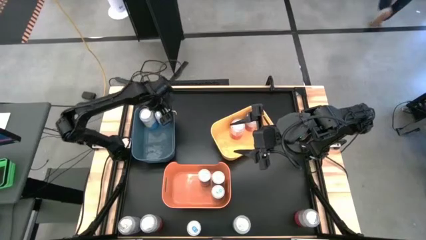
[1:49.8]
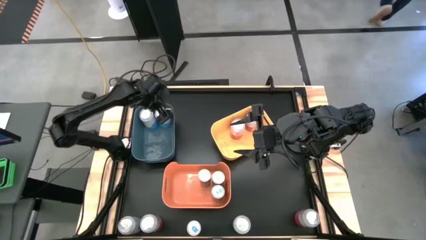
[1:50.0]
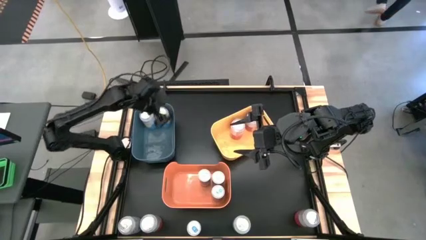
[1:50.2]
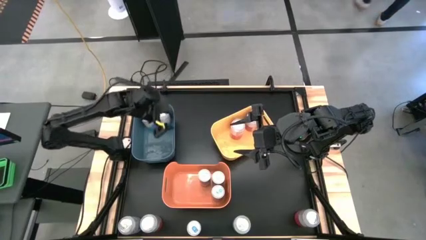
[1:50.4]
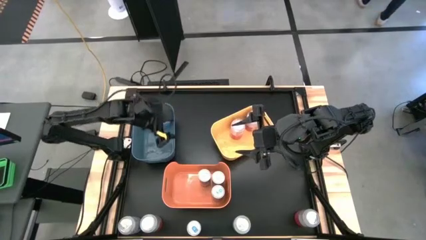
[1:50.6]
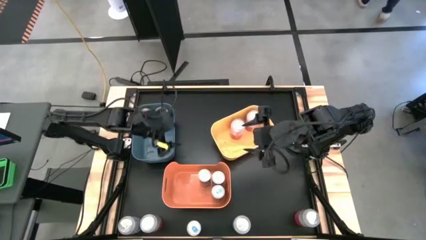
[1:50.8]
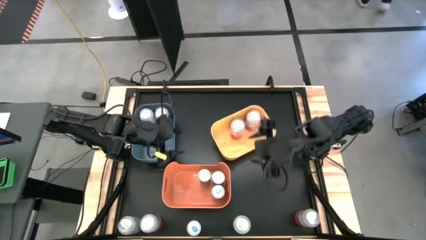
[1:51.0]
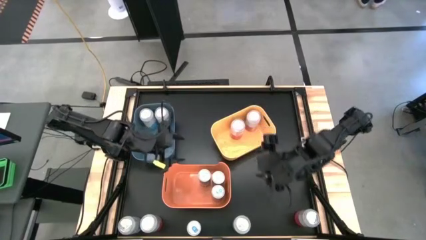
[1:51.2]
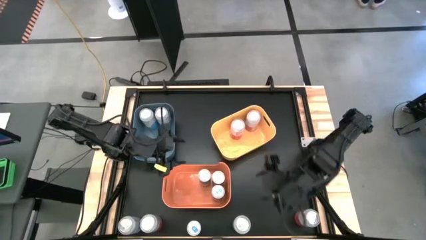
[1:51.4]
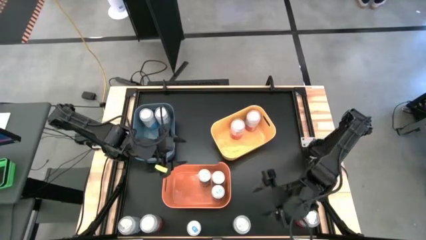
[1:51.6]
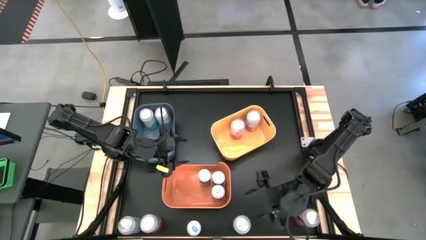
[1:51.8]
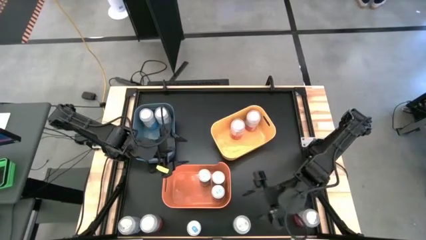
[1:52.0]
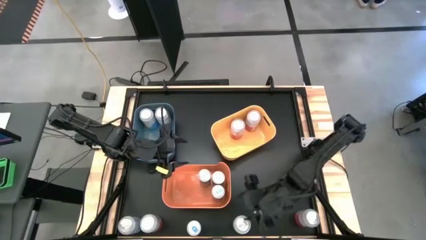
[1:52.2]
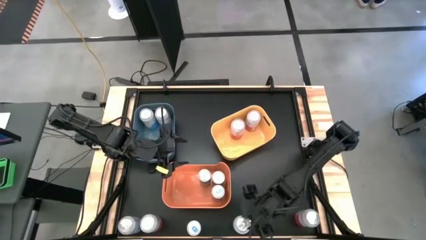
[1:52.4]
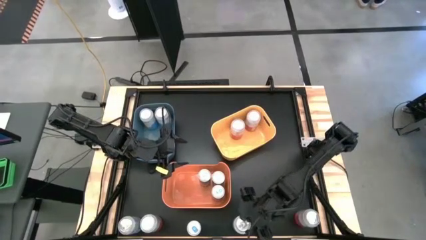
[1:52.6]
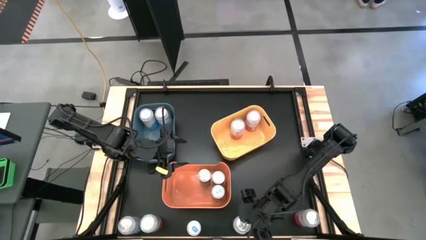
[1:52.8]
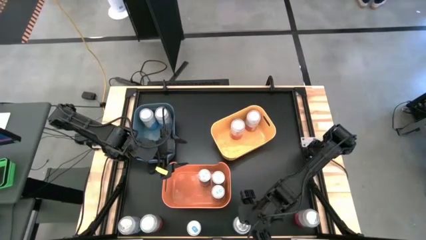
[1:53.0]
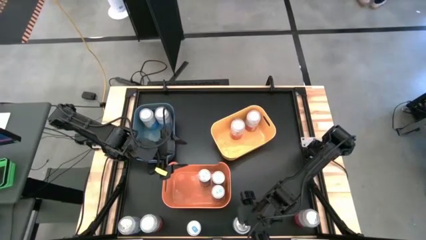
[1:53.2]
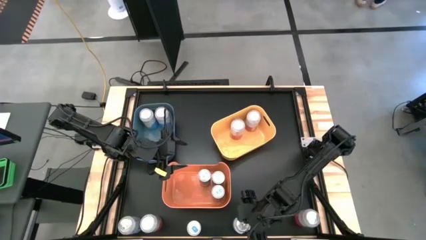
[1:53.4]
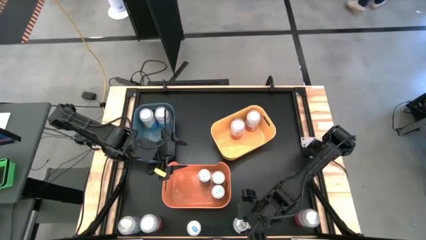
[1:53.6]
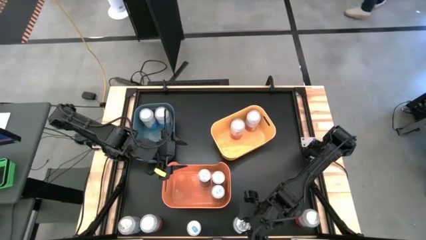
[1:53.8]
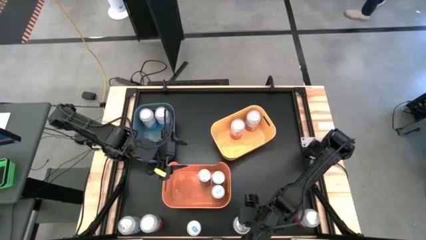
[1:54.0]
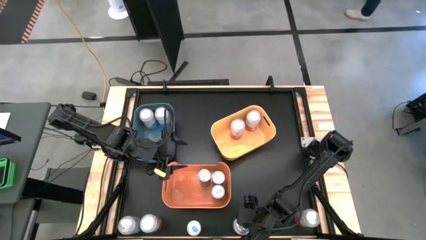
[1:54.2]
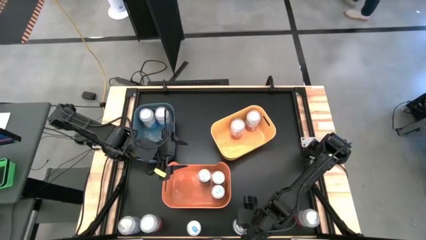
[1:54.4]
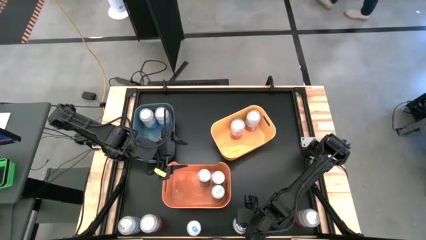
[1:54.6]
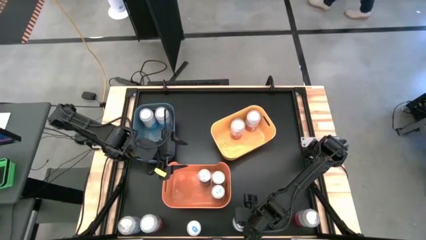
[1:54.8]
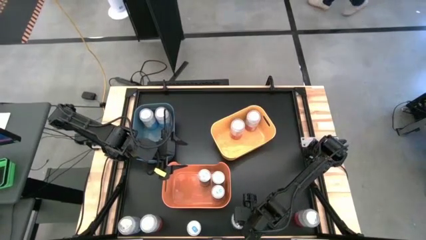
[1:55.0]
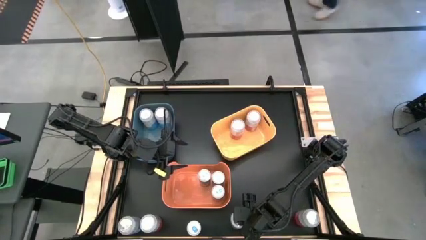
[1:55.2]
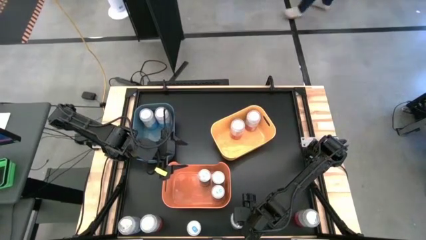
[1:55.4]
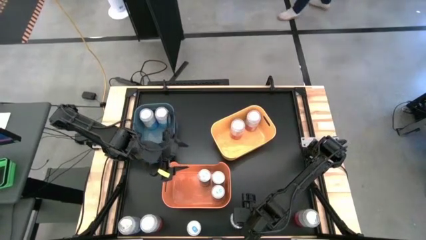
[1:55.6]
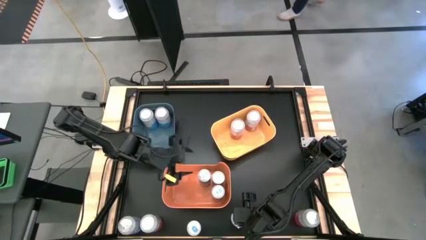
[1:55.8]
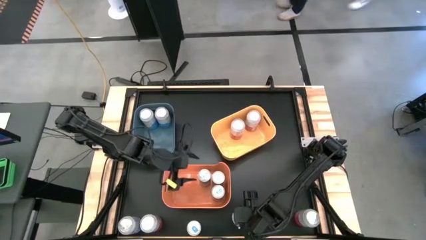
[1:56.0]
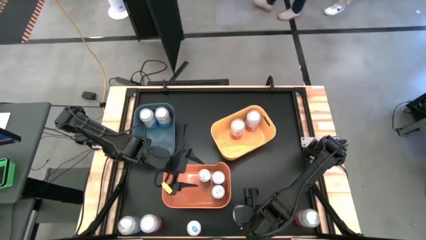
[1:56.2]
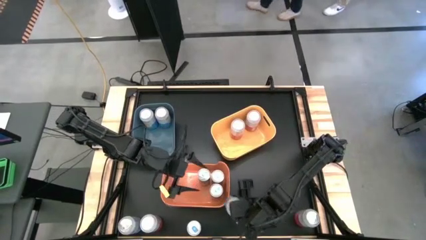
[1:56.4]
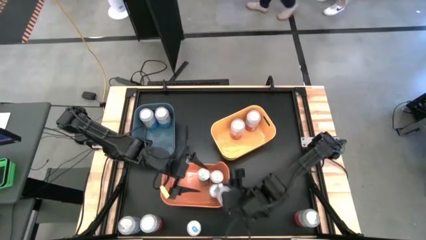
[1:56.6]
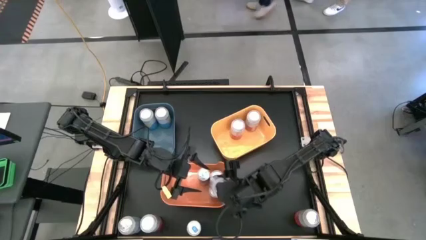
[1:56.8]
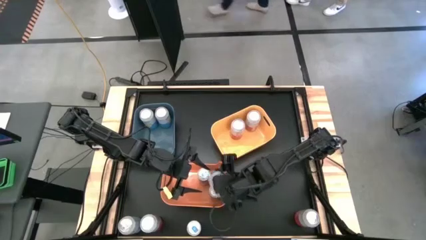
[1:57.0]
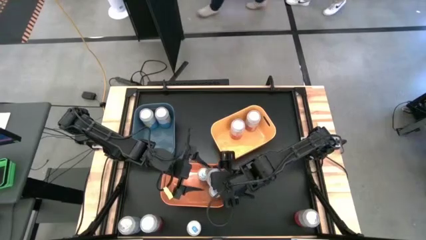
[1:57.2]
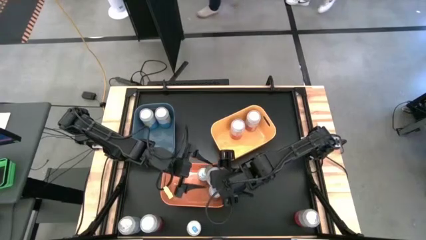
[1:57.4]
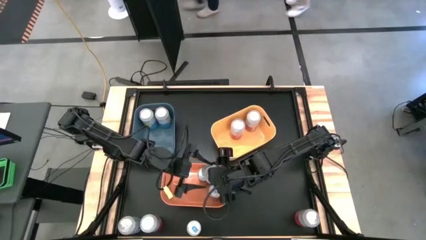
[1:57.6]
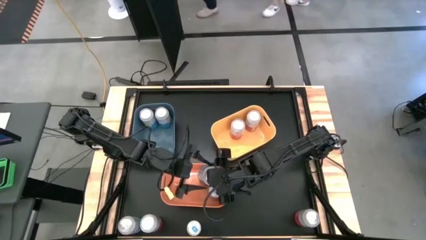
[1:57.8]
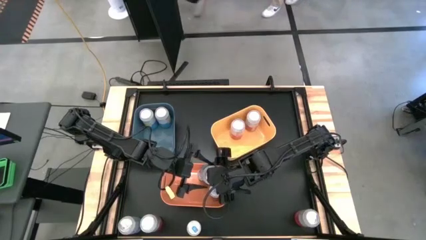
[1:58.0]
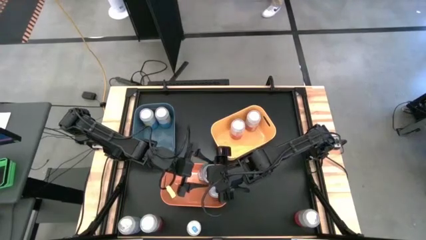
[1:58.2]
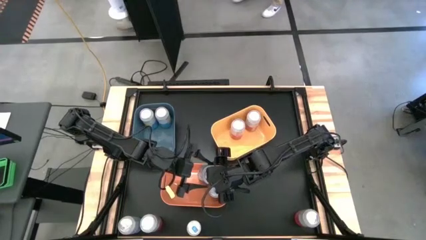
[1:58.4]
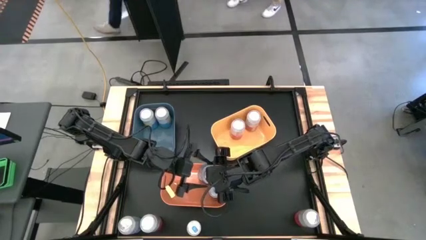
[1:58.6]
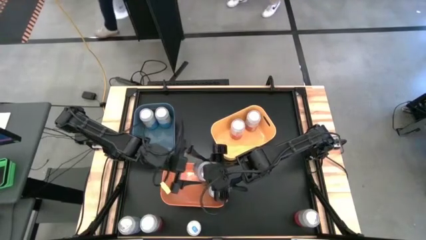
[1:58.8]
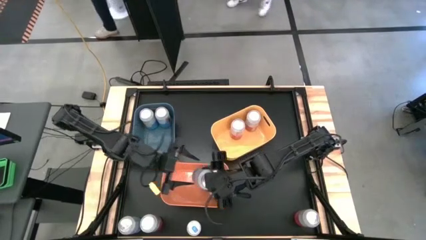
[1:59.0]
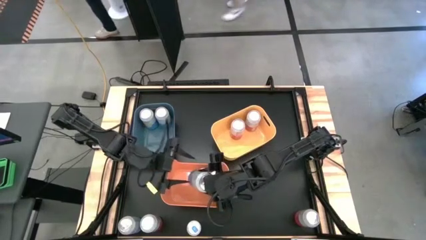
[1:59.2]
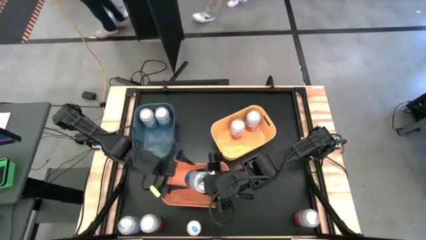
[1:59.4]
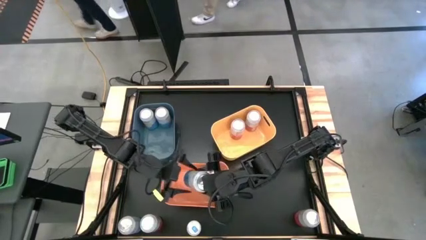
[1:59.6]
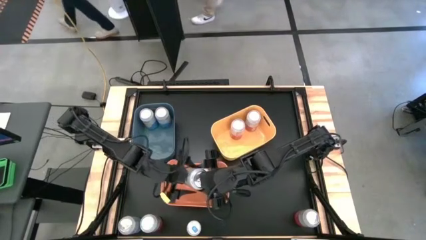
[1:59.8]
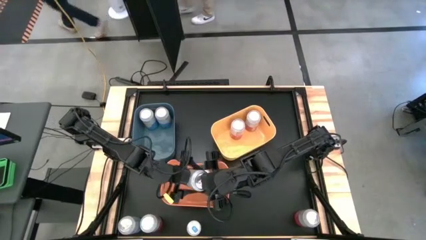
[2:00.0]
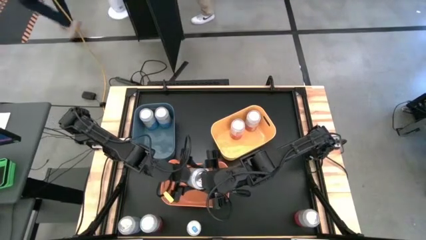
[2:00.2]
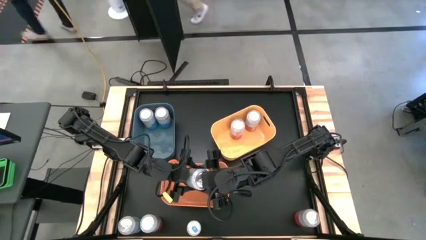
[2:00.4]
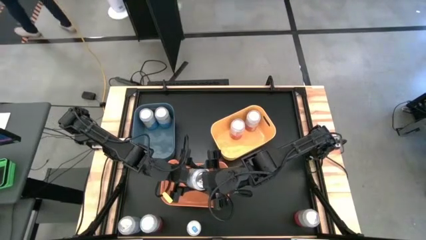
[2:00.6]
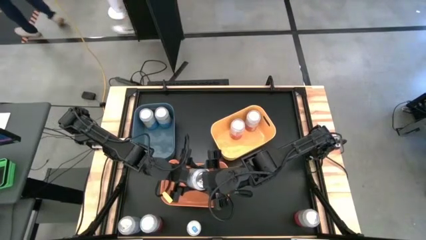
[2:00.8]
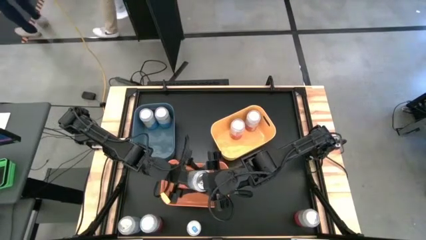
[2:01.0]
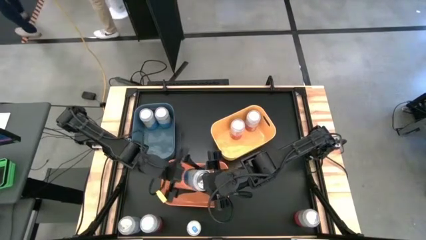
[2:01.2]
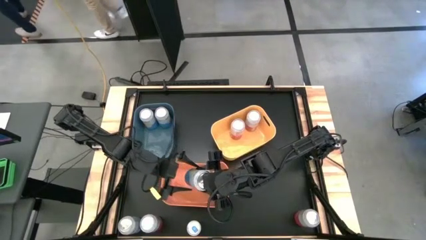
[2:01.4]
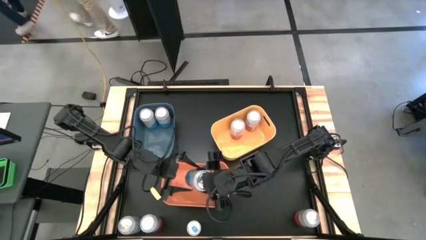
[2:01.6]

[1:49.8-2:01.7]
Task: Sort soda cans
Put the blue soda can into the blue bin

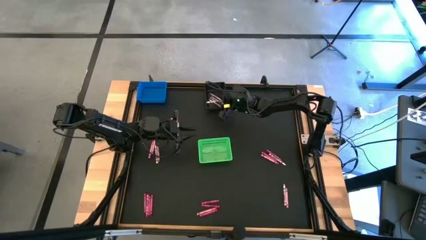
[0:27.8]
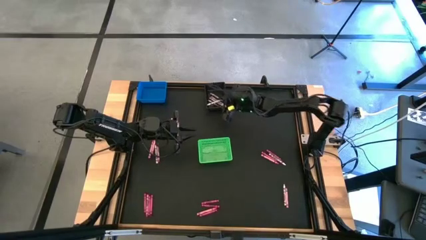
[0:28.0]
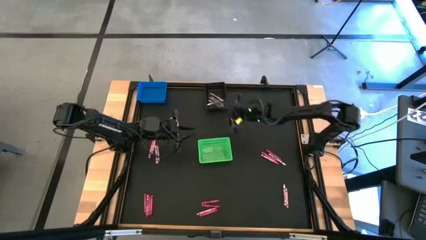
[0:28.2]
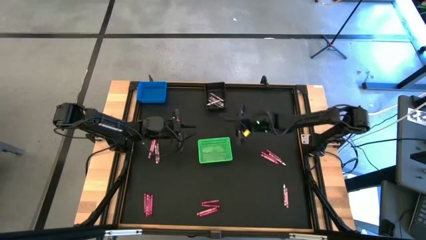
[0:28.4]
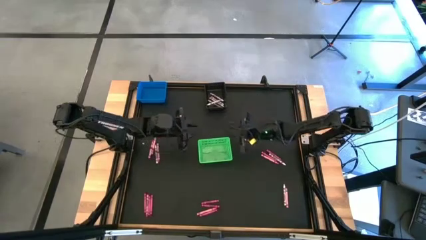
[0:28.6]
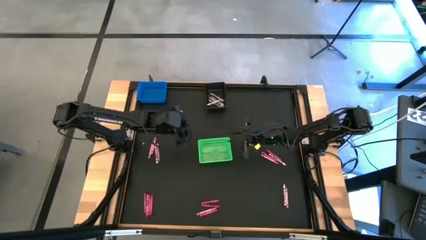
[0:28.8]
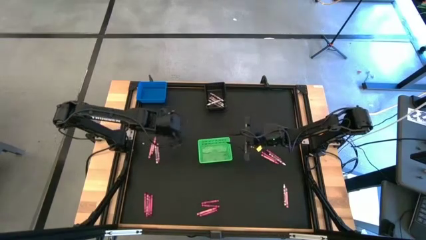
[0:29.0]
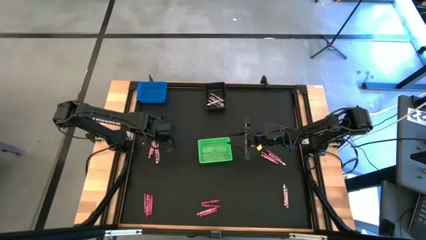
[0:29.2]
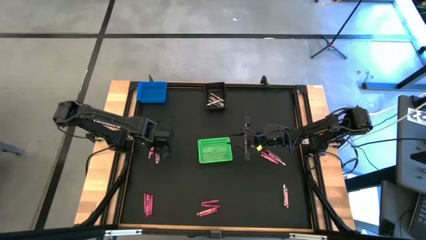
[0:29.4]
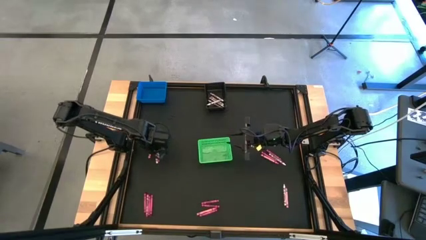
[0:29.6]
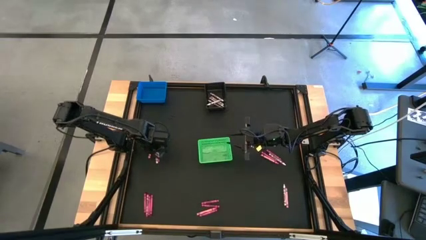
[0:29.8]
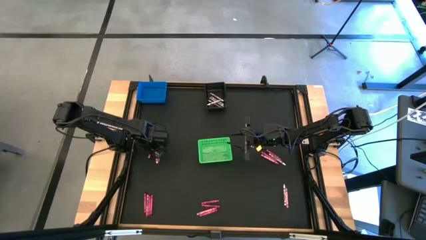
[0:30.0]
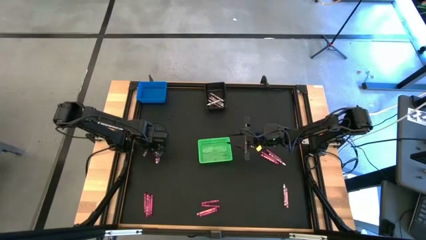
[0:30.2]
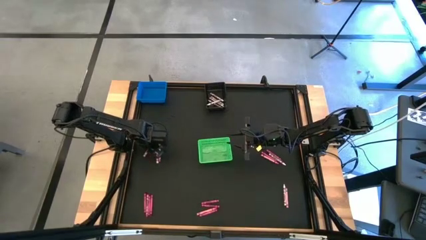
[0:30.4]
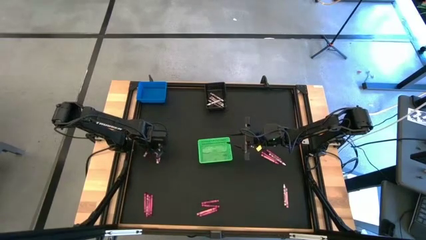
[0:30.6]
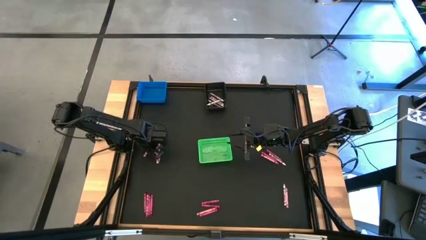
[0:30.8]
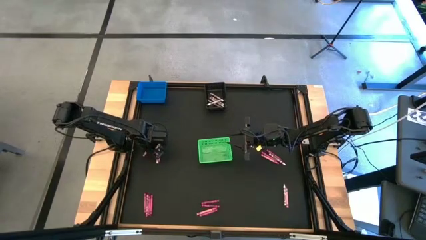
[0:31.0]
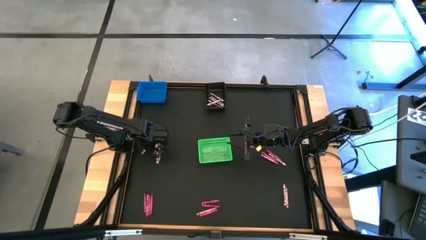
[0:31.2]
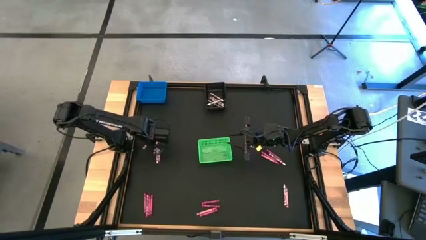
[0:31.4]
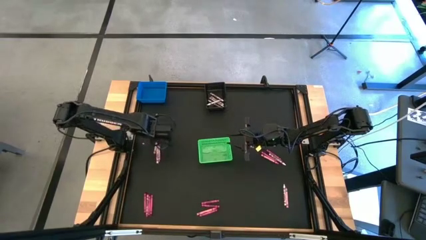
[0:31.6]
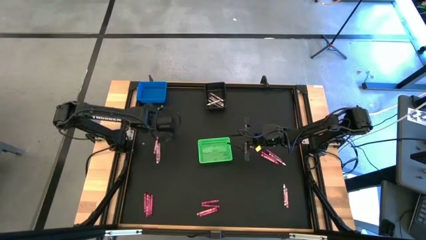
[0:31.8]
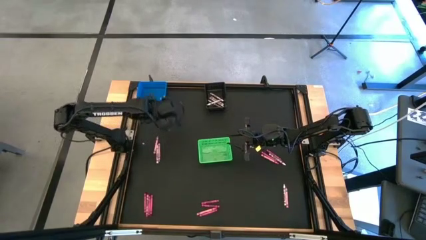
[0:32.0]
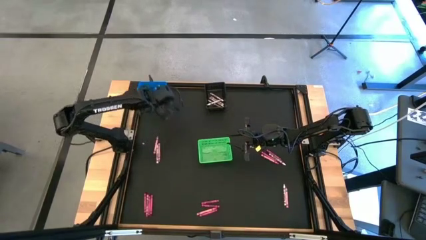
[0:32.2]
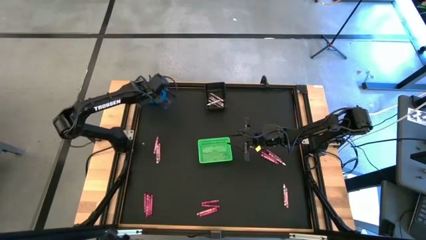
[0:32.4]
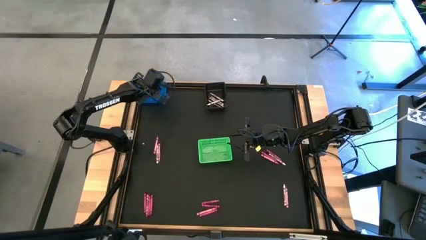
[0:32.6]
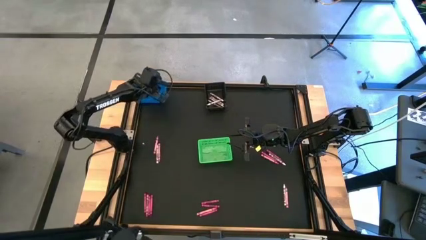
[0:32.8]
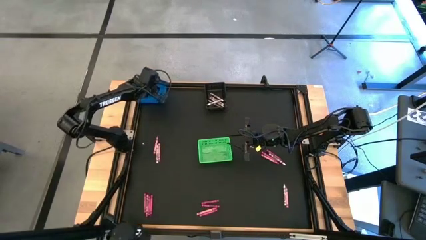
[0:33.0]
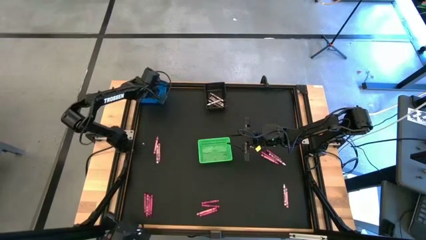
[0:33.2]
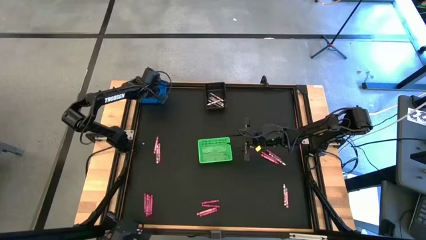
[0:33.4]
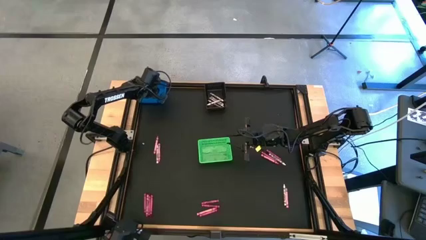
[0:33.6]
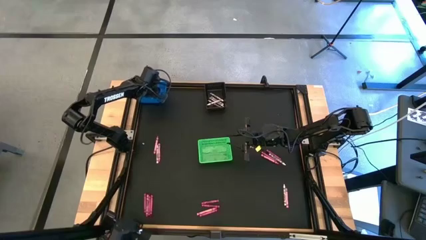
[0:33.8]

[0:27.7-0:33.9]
Task: Sort crayons
Put the pink crayon into the blue bin
